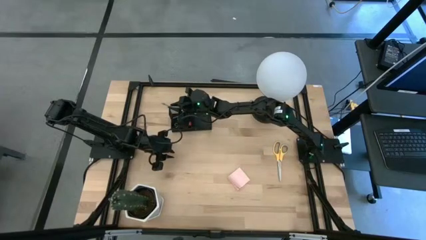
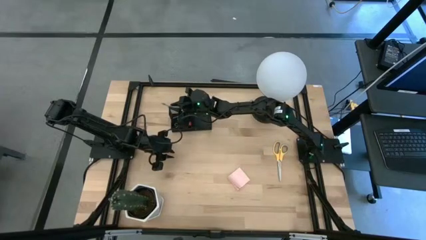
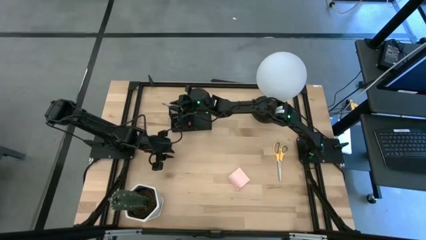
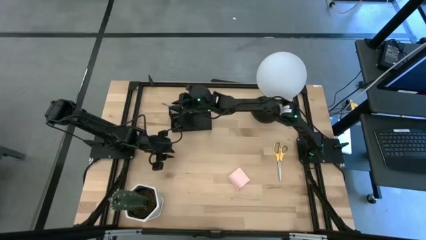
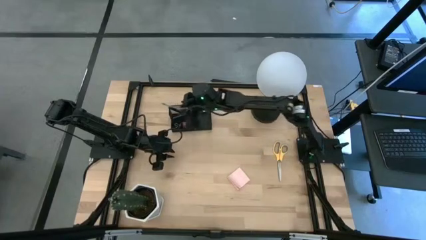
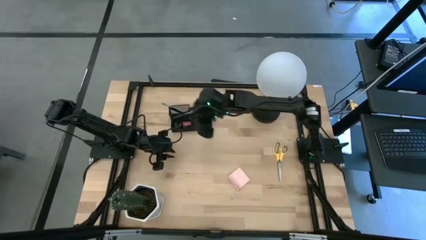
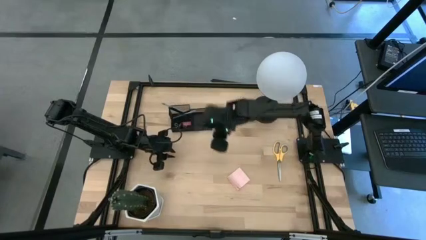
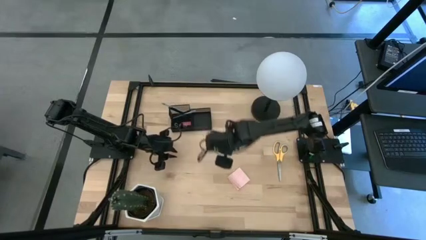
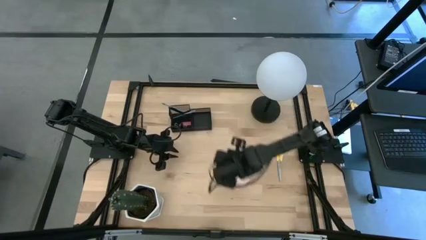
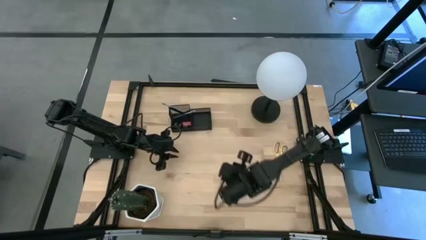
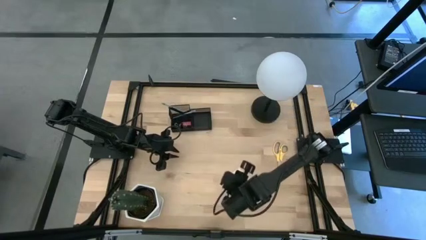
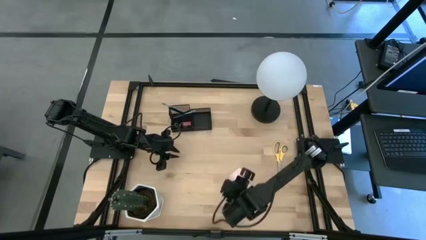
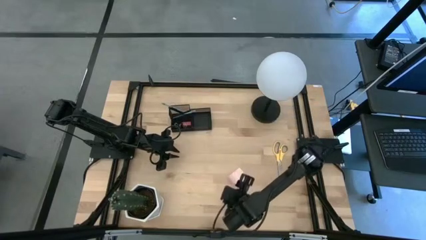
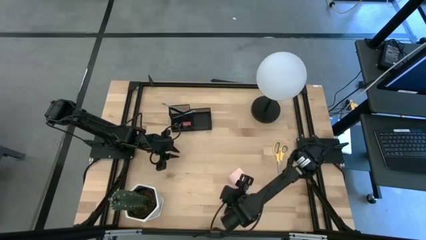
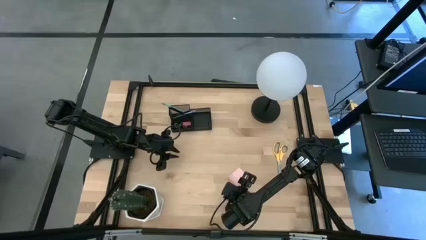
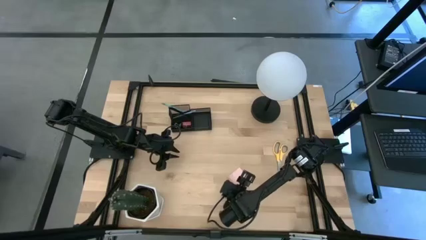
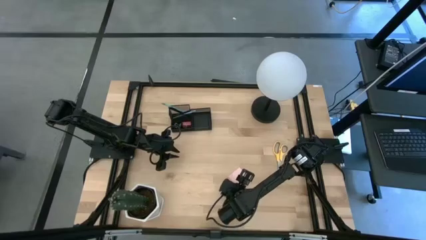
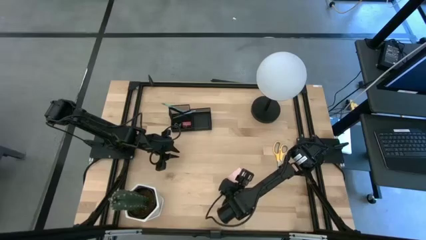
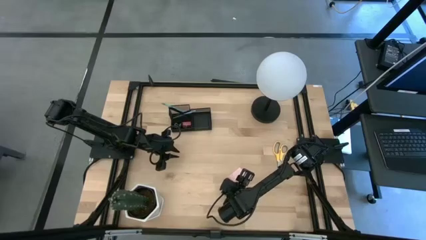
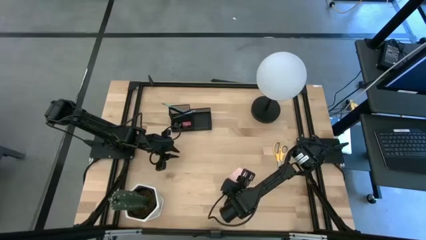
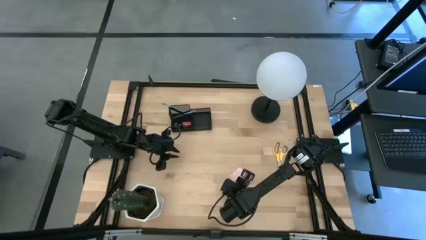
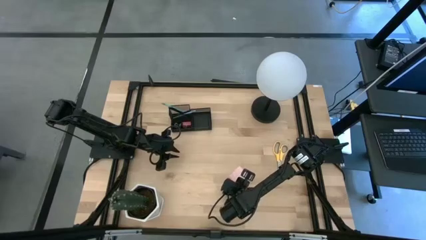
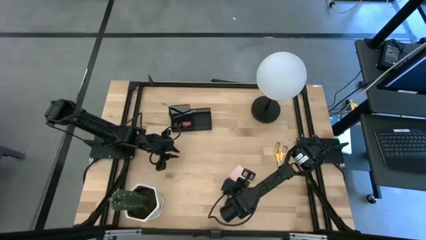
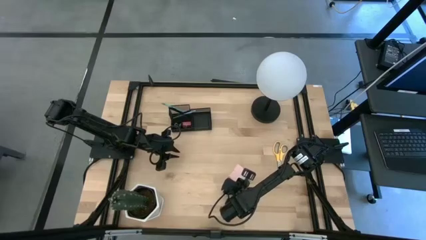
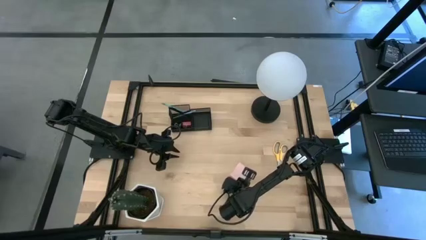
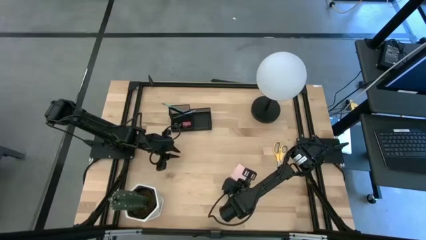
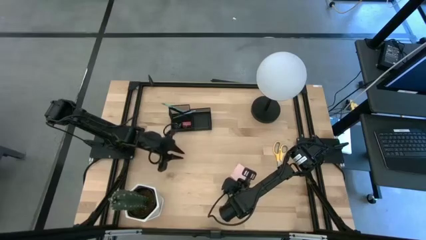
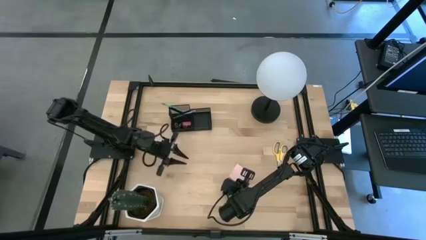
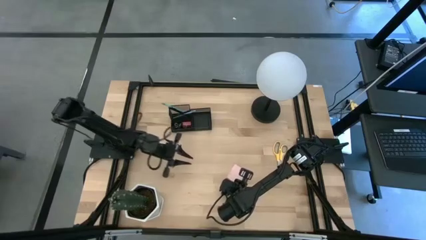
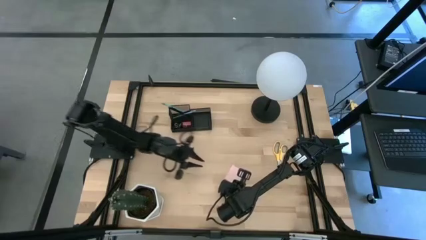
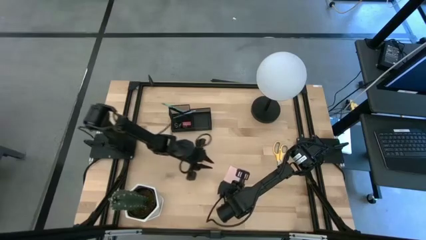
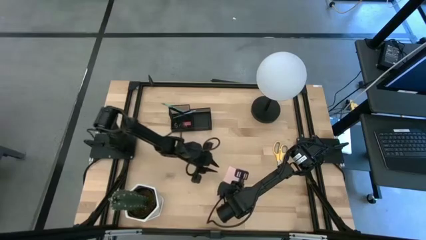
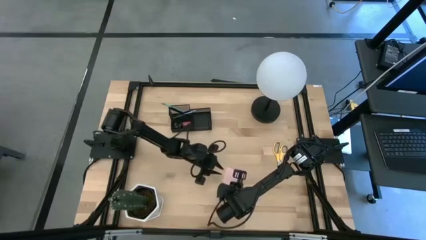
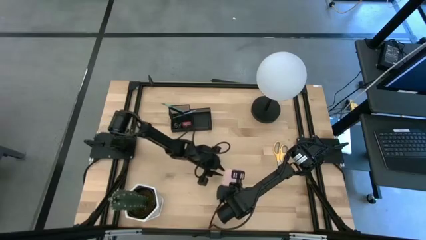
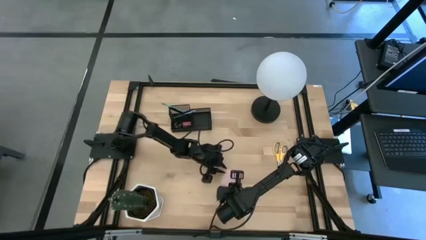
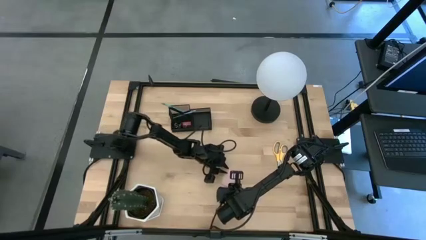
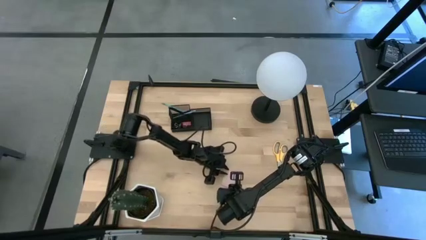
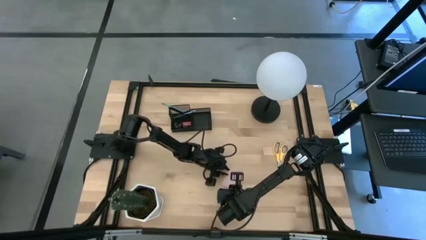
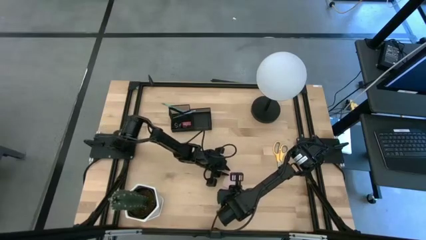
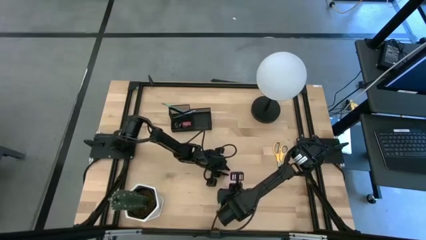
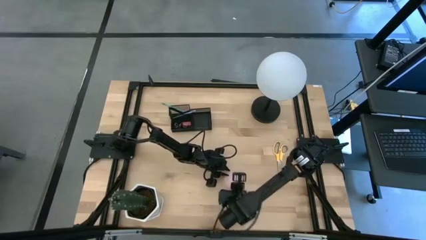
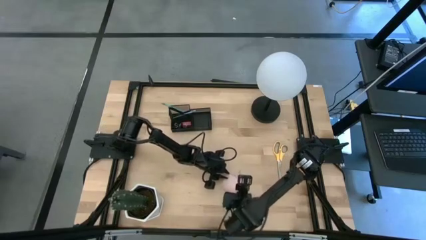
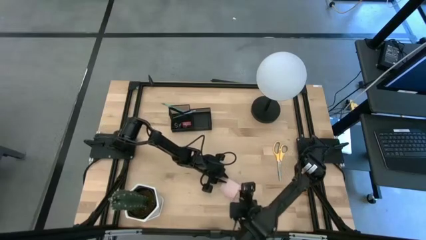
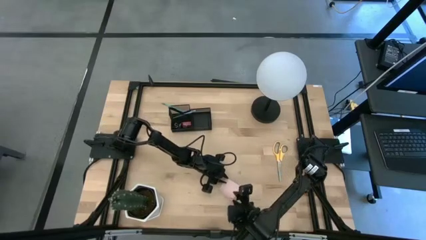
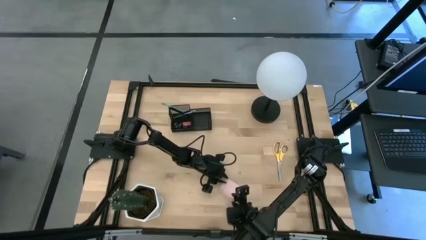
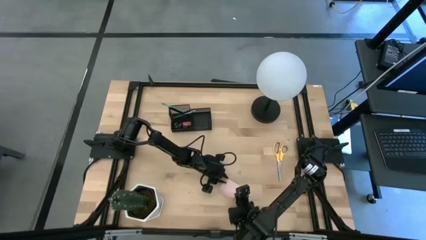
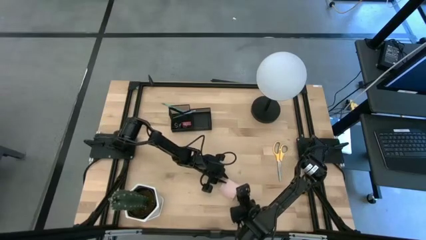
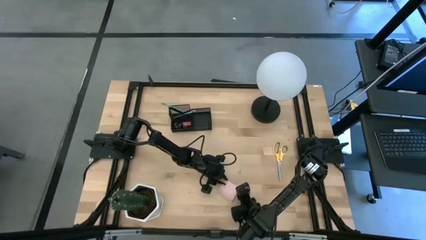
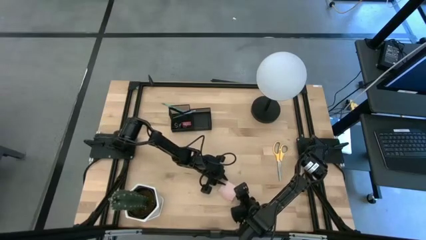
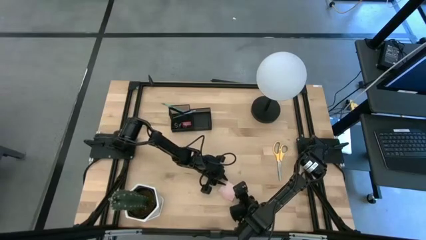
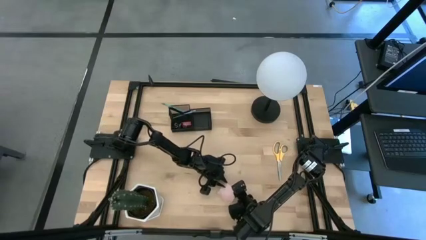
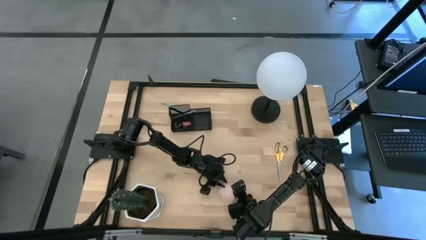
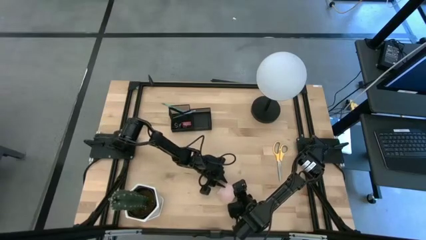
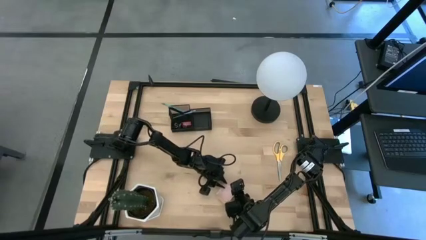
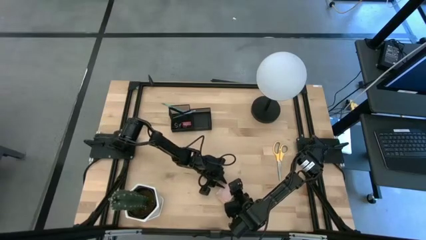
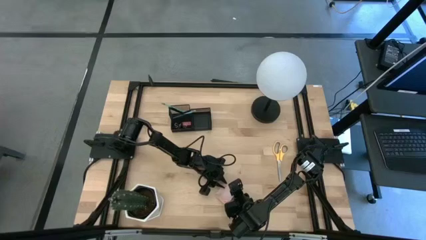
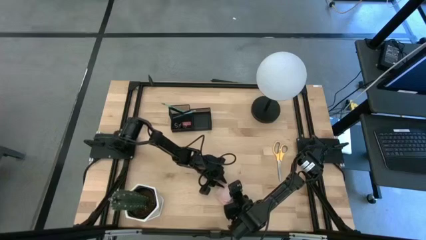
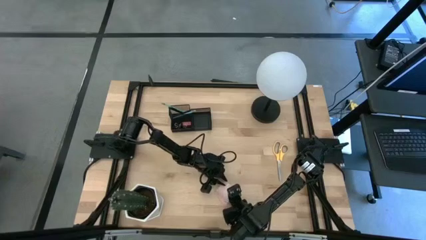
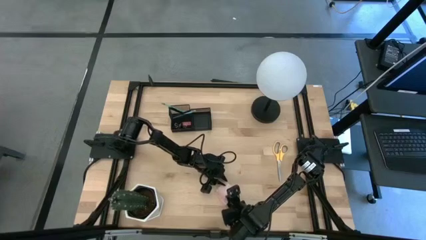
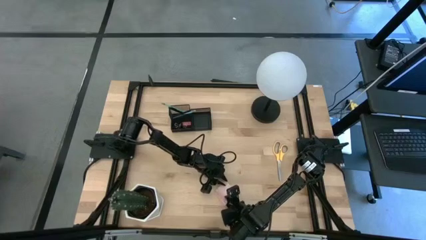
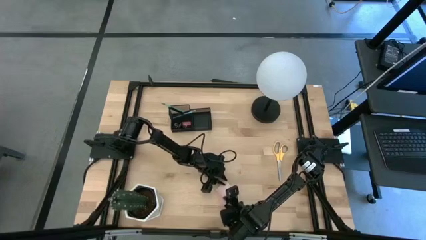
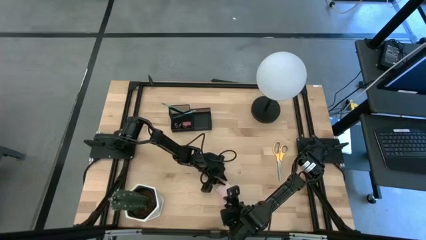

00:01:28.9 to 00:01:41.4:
Task: Pick and place office supplies into organizer
Put the pink sticky notes into the desk organizer

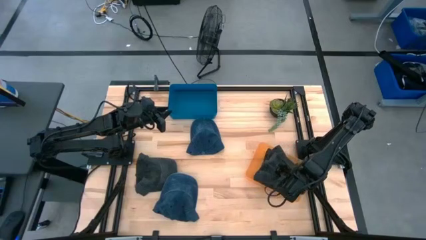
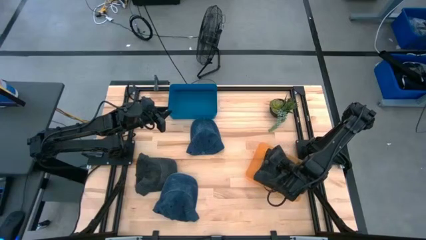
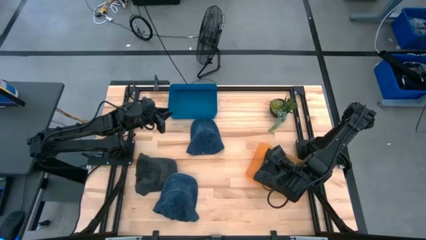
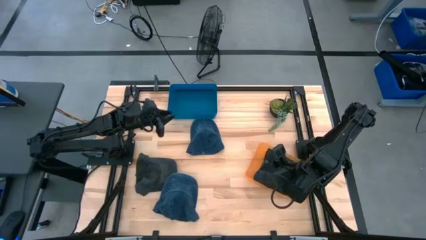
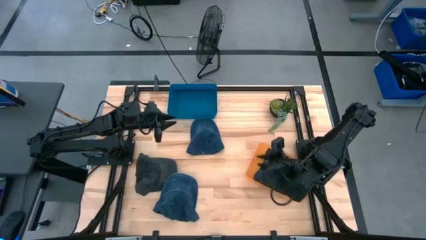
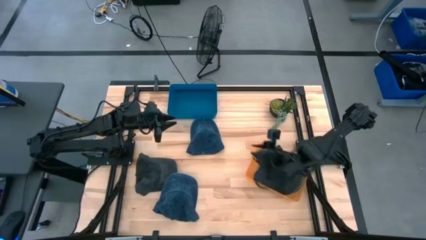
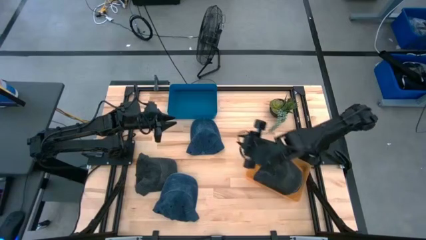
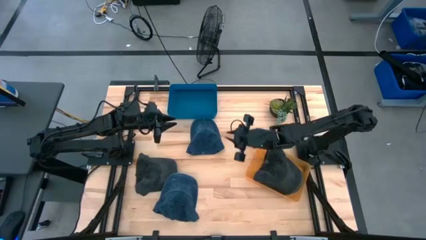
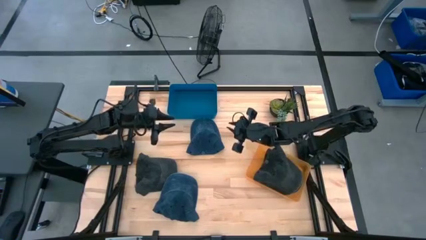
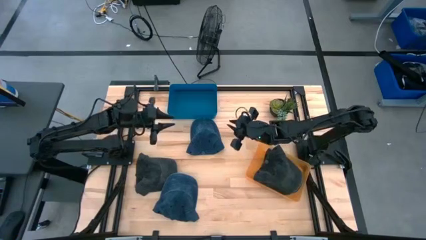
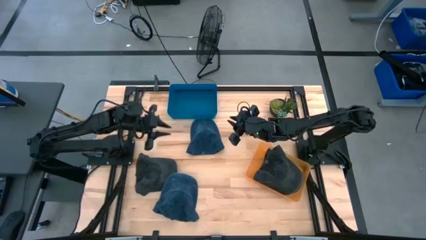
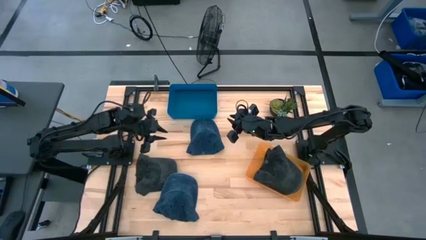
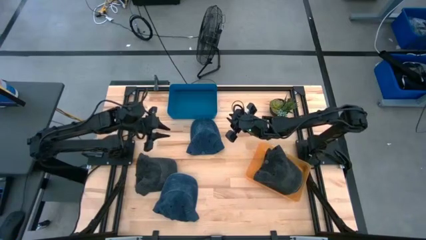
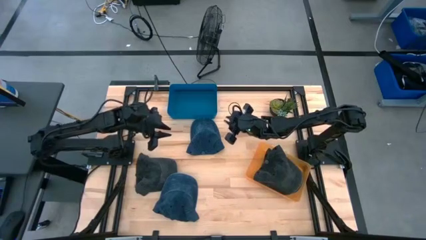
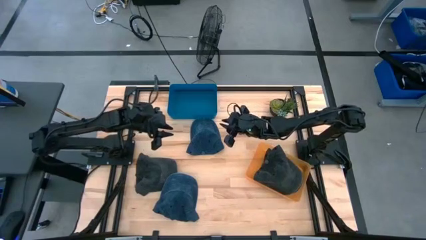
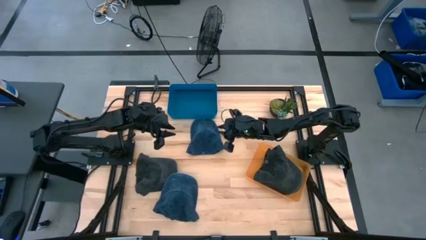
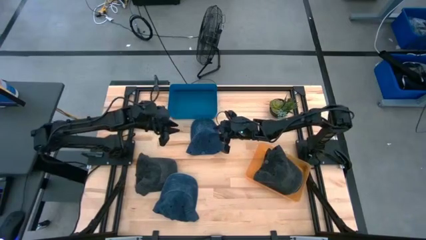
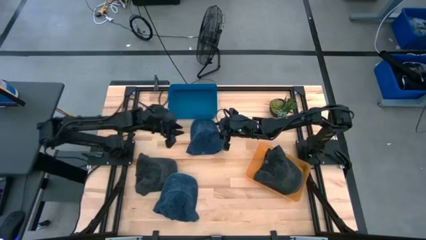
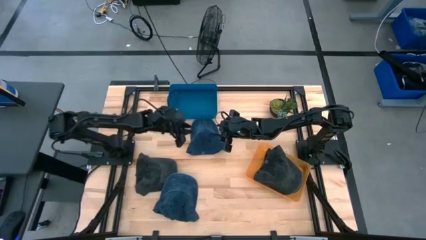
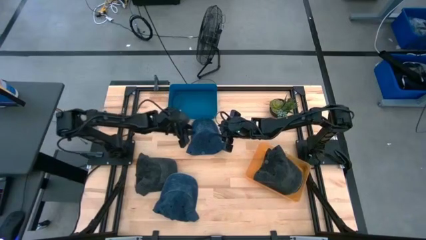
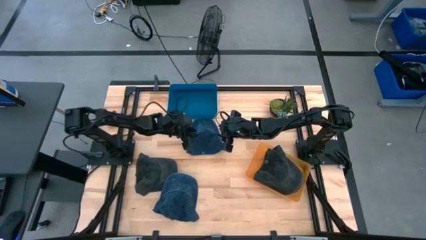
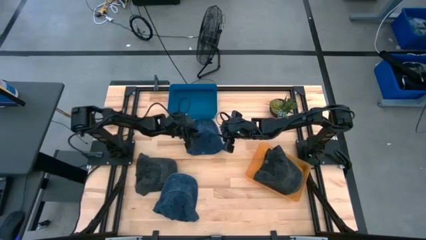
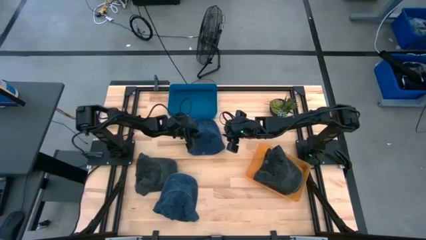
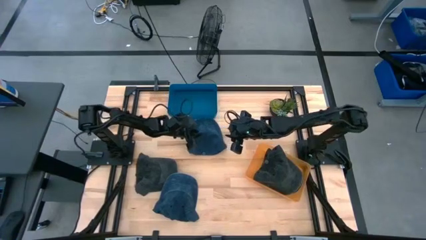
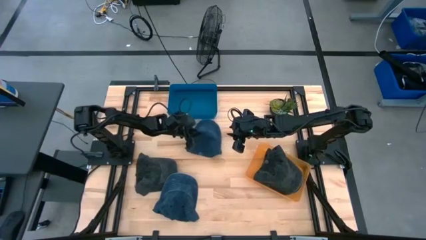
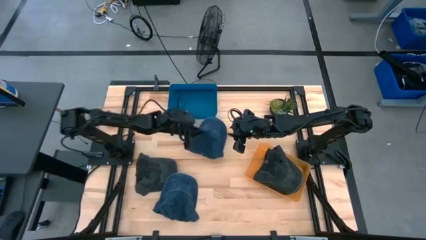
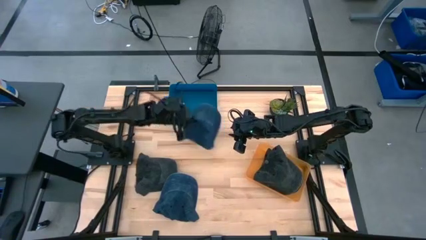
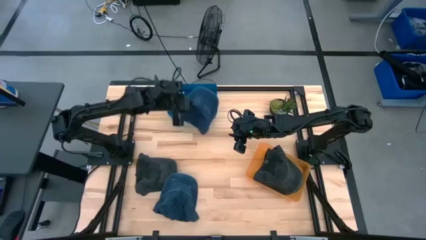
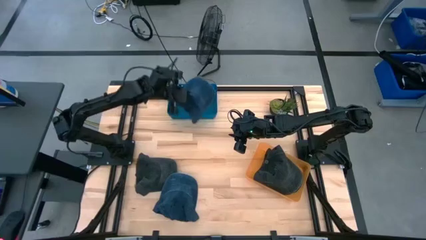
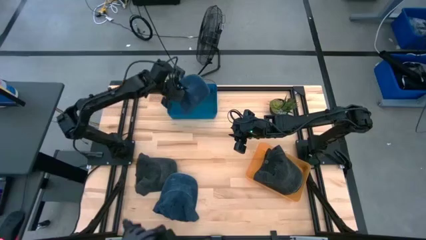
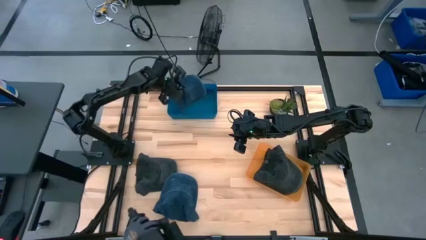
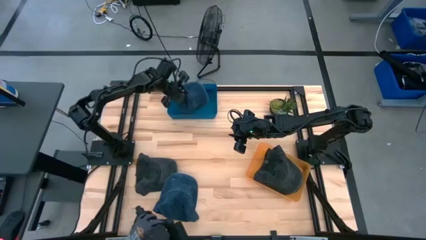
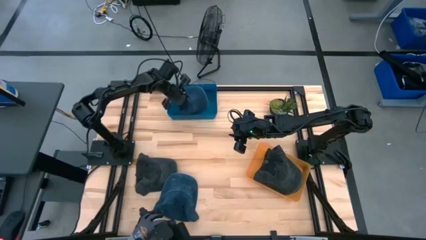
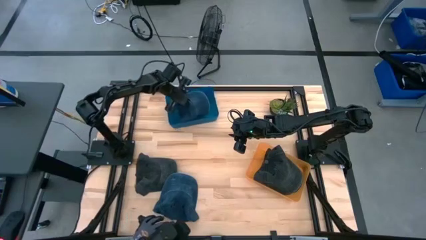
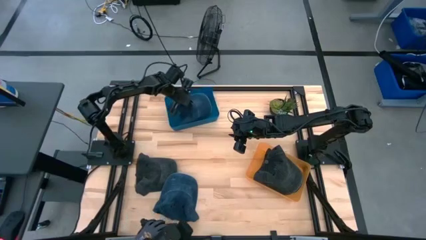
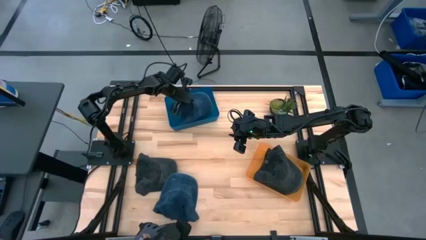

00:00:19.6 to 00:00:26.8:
Task: Pick & Place hat
Put the top blue cap into the blue bin
